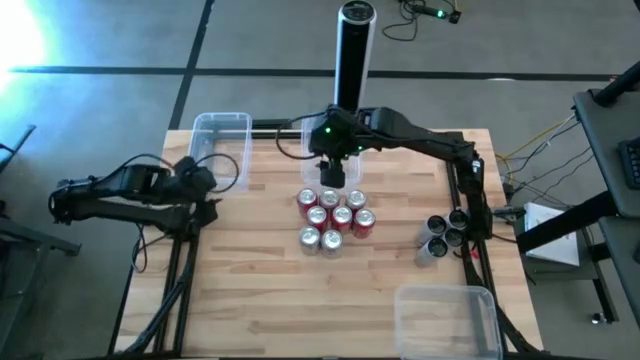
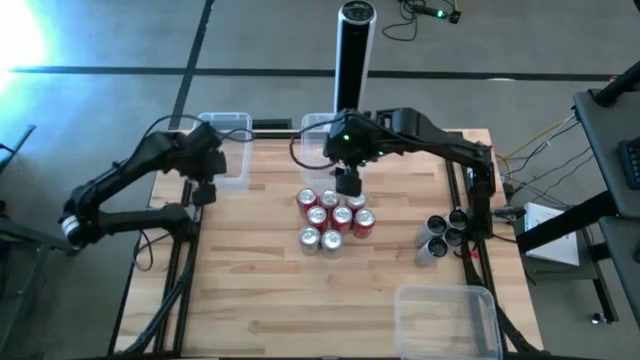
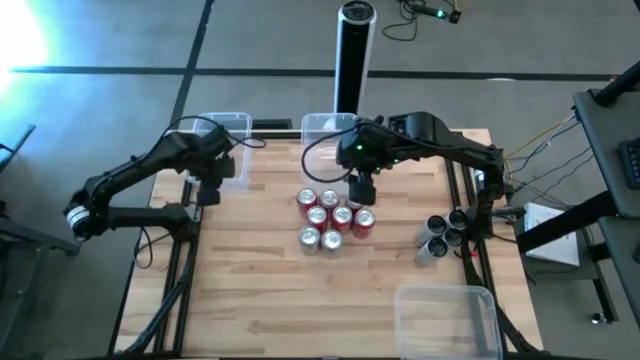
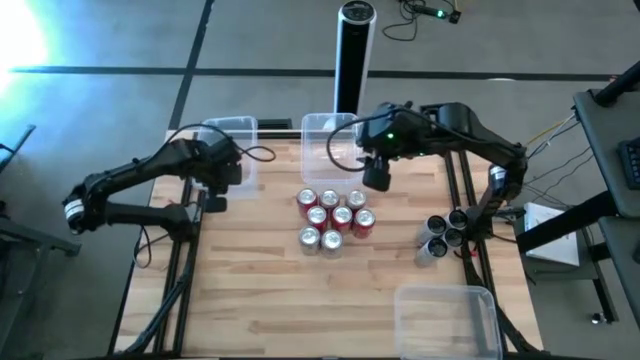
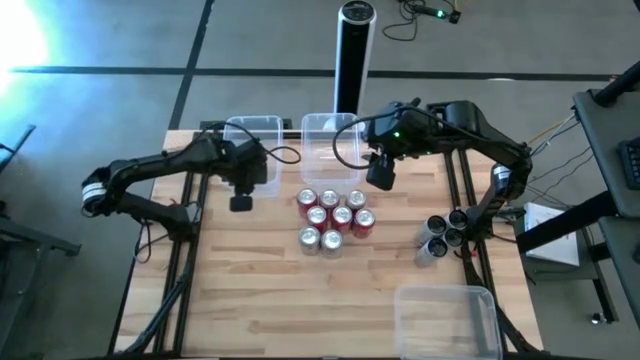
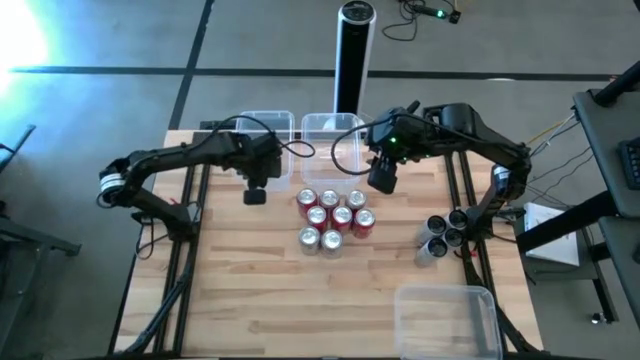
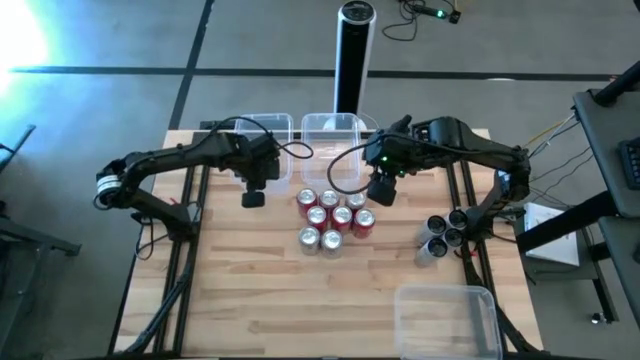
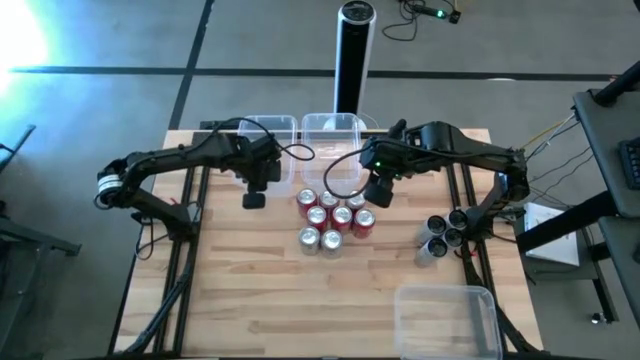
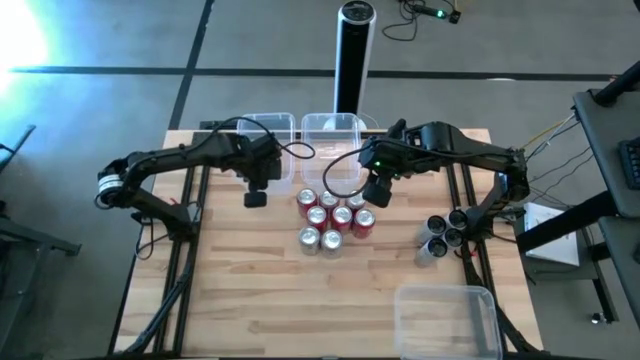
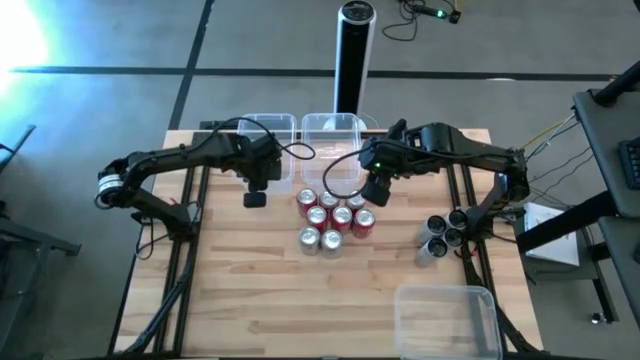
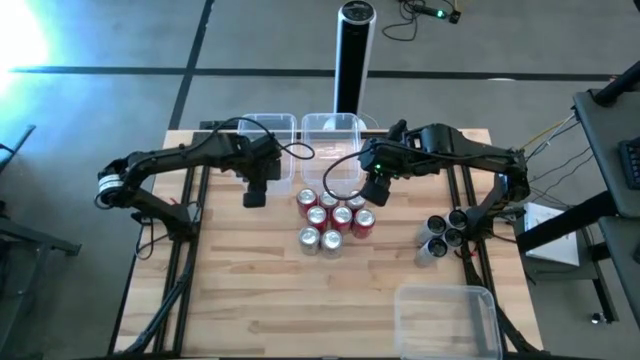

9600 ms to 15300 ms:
Task: Sort soda cans
Move the left transparent bin to the left side of the center transparent bin

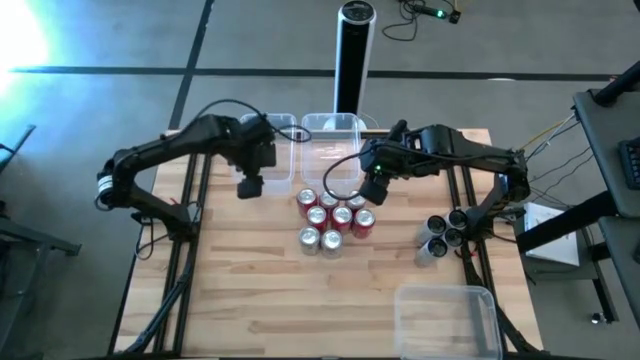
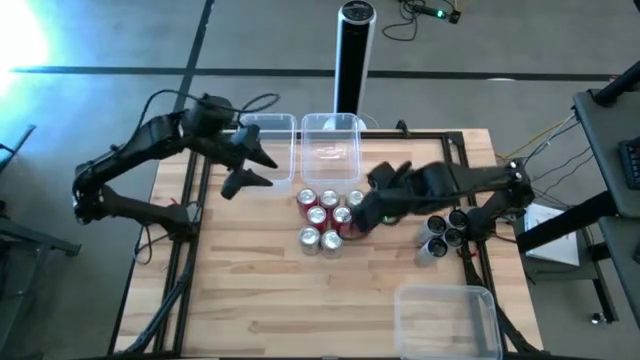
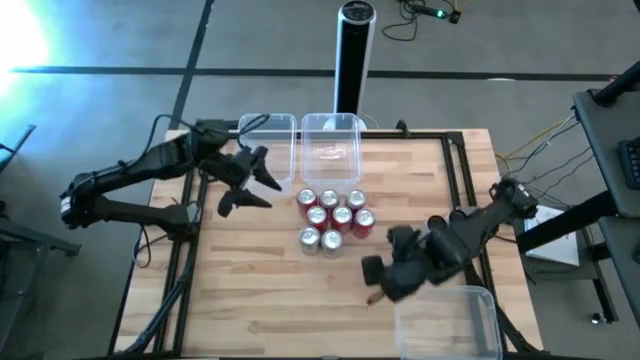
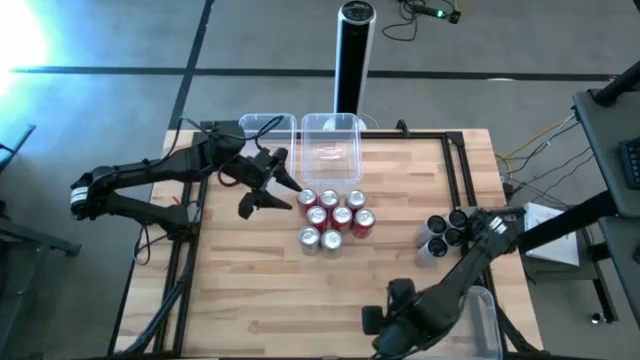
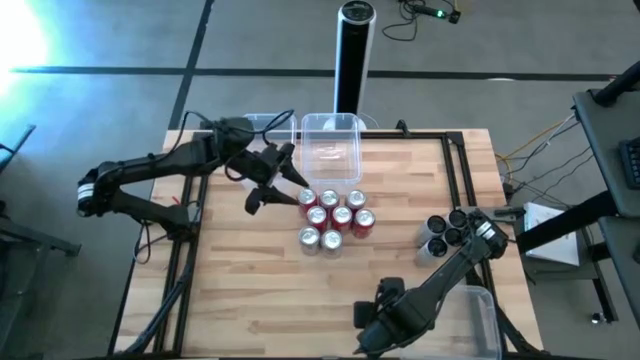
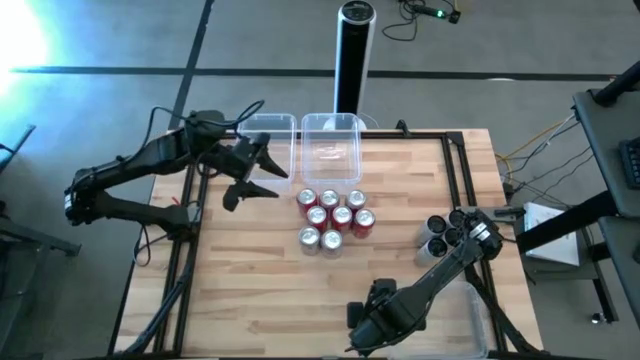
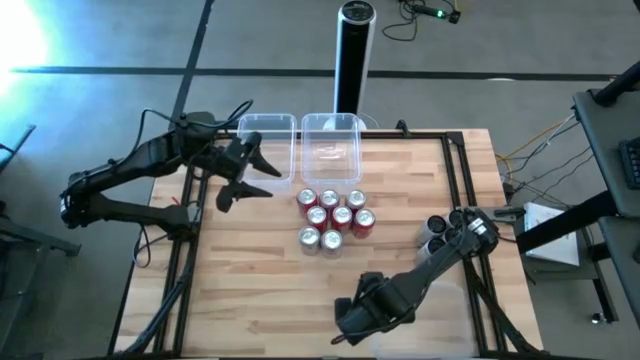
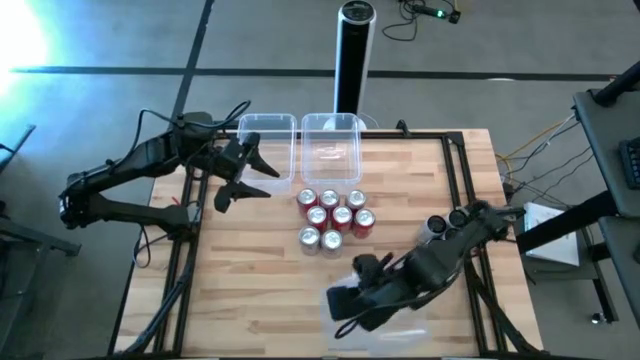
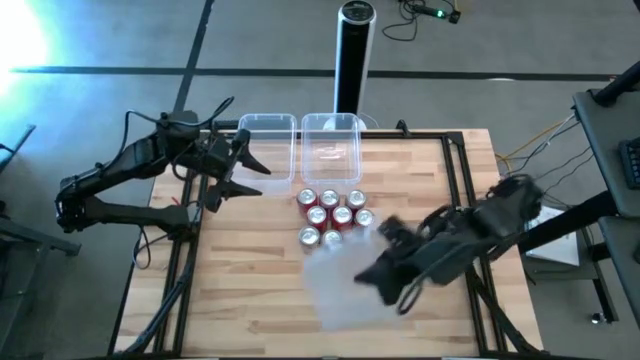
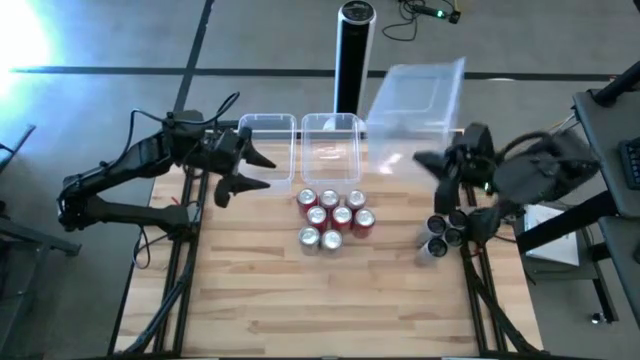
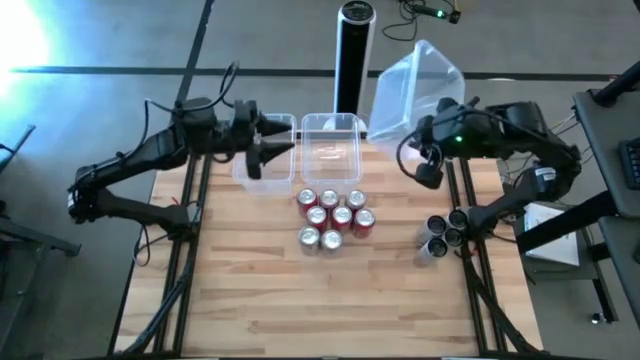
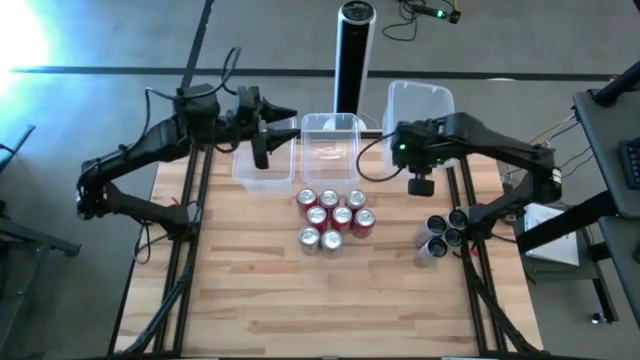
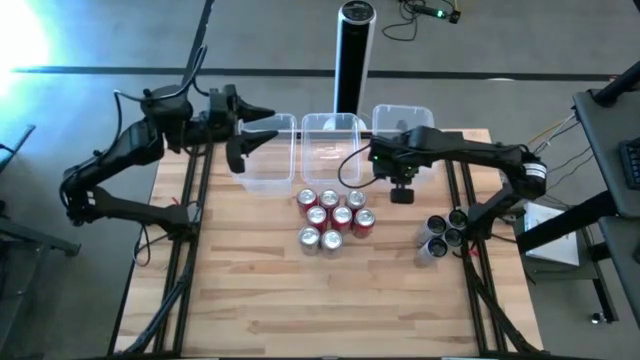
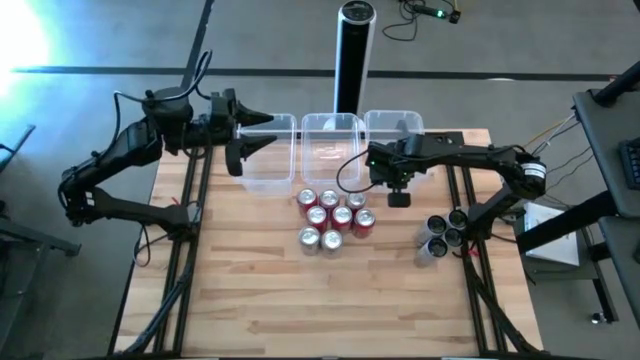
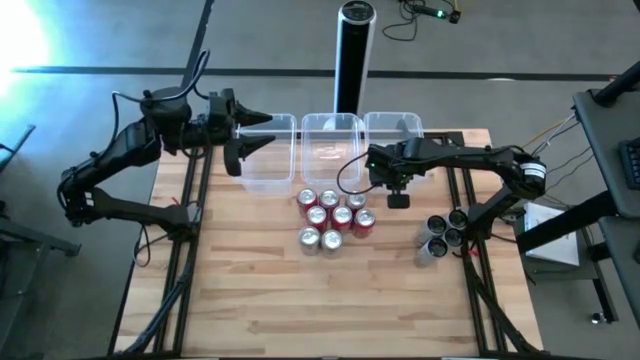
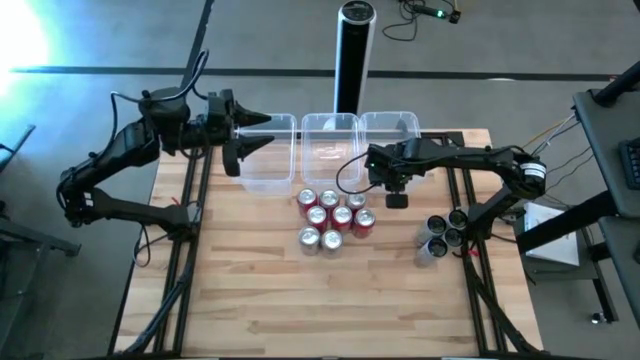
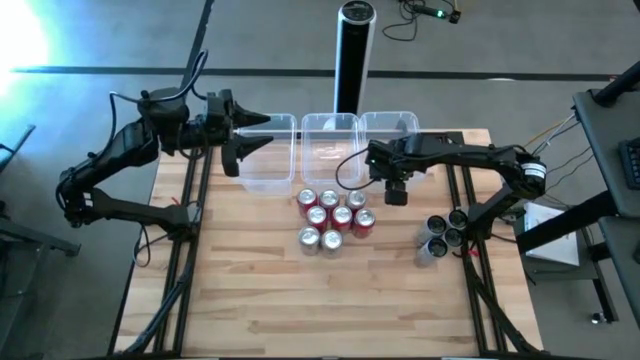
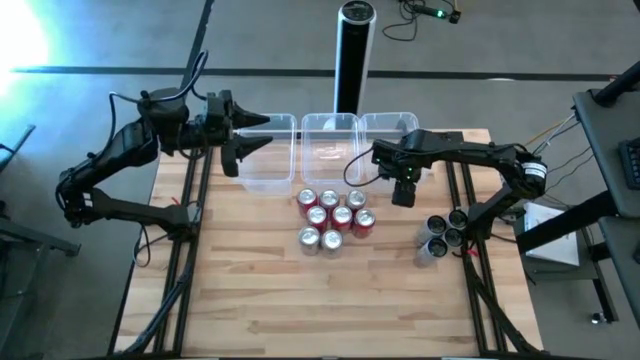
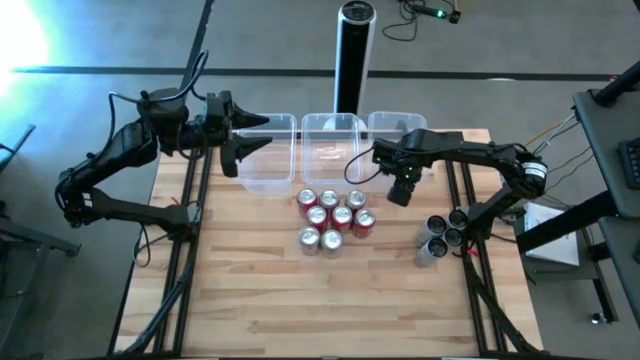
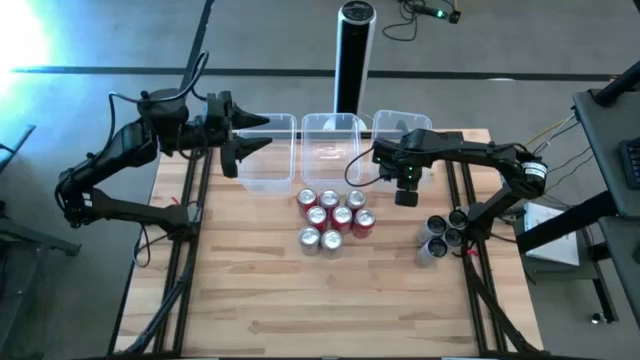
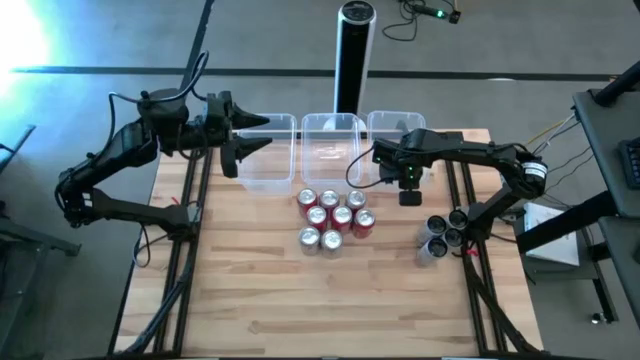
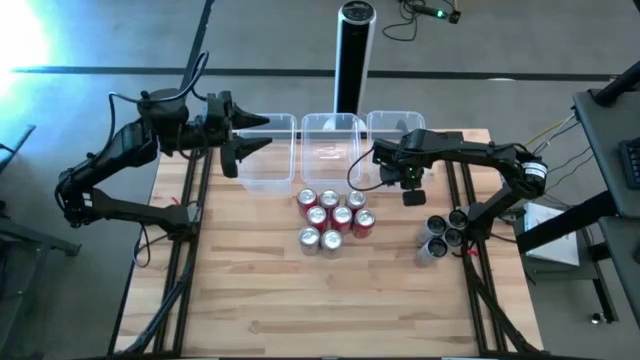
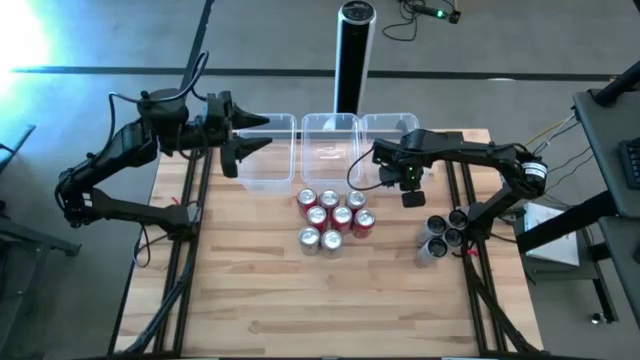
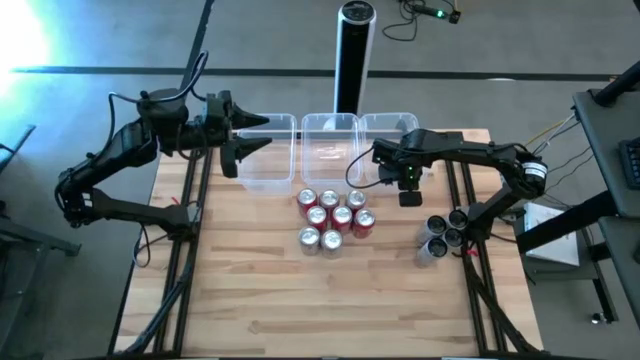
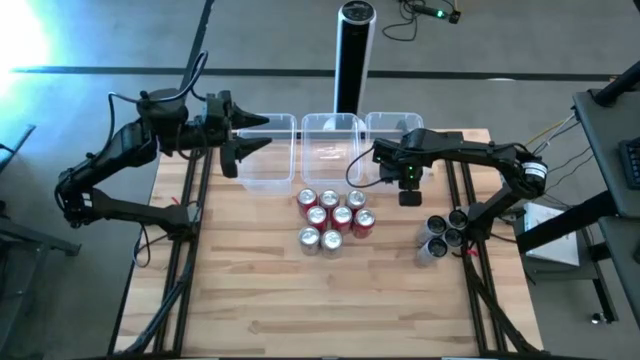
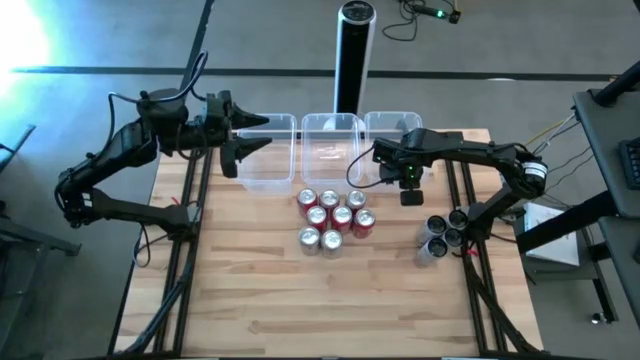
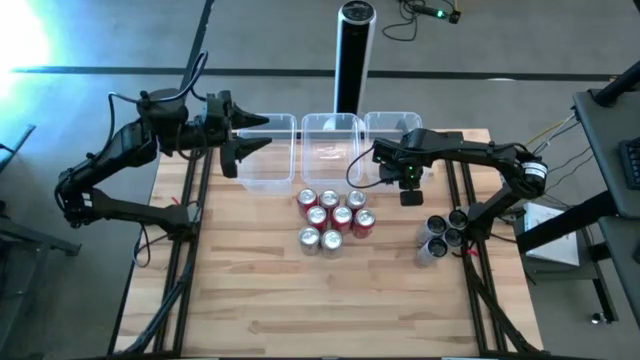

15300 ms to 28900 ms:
Move the bottom right transparent bin to the right side of the center transparent bin

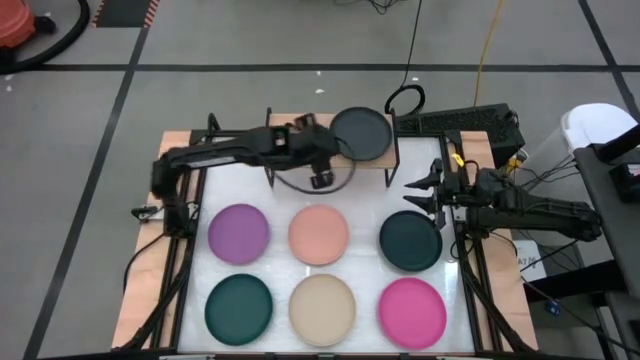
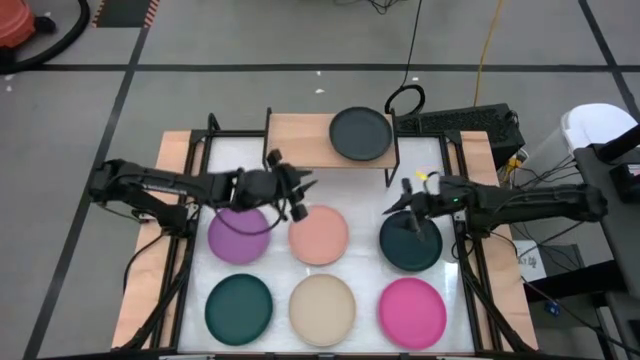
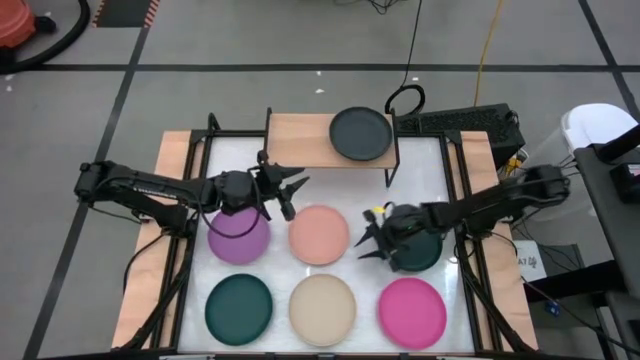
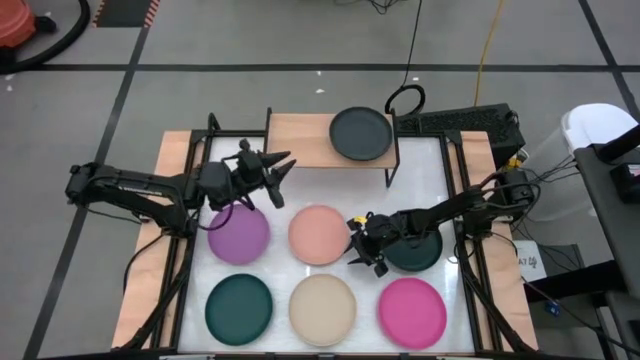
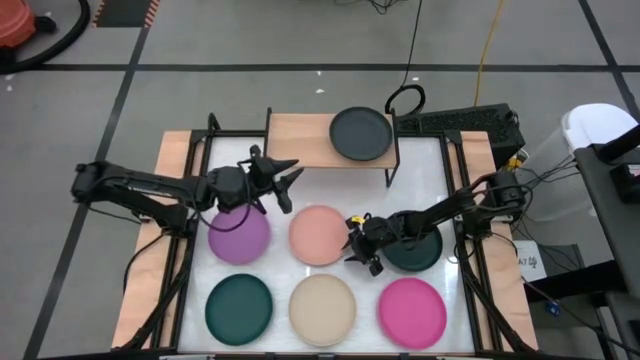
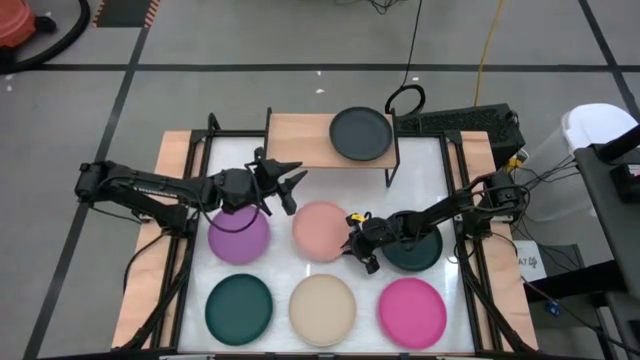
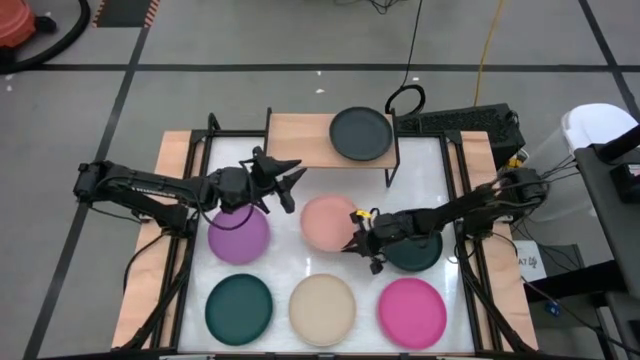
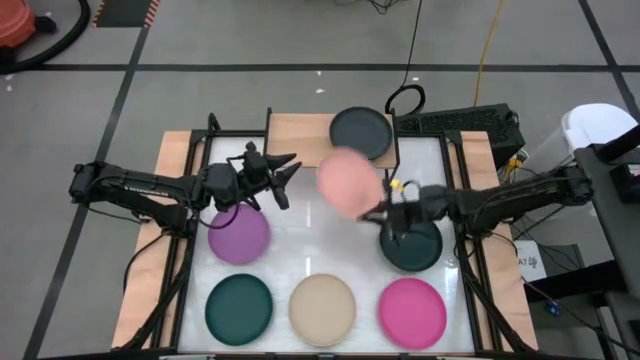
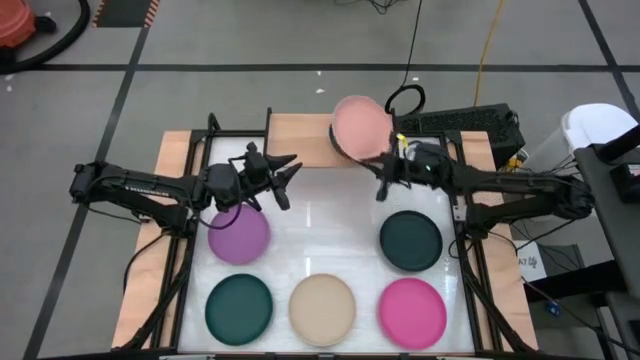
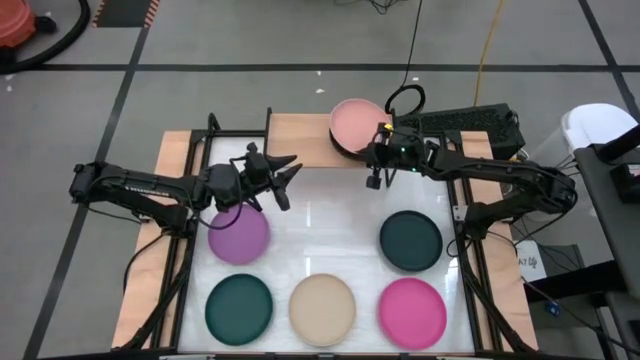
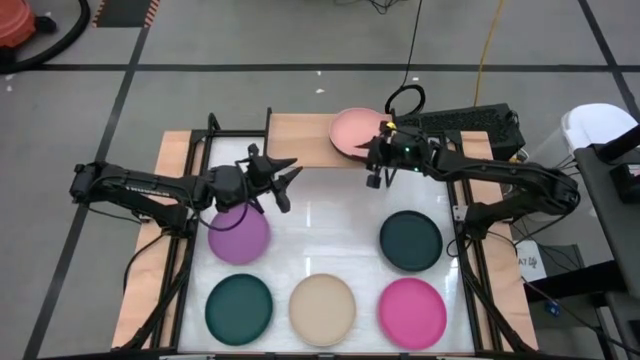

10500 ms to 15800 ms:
Task: Place and stack plates onto a shelf
Stack the light orange plate on top of the black plate on the shelf
